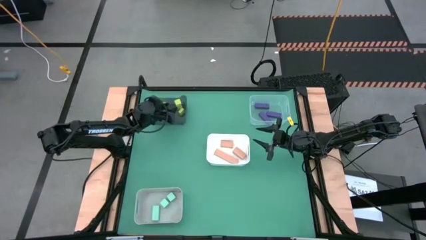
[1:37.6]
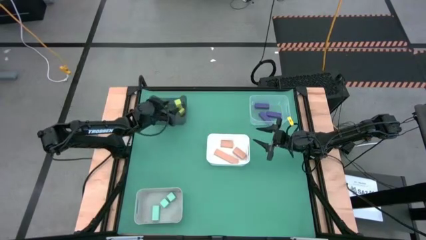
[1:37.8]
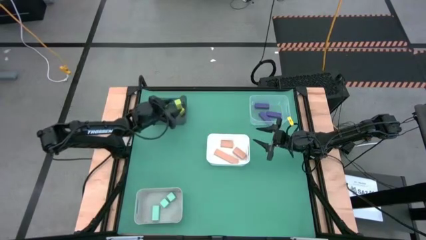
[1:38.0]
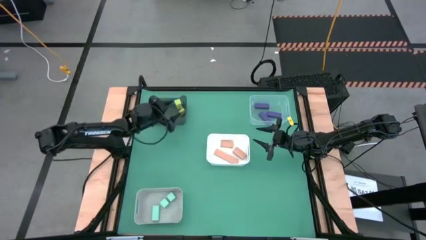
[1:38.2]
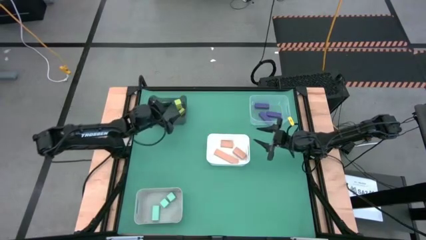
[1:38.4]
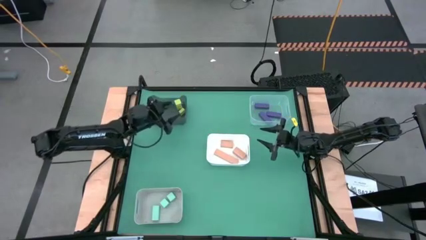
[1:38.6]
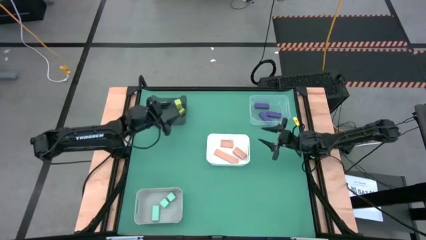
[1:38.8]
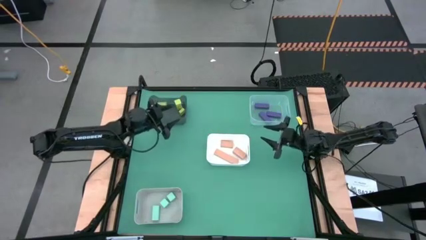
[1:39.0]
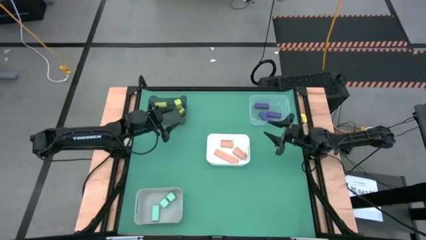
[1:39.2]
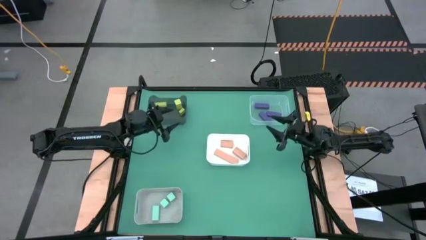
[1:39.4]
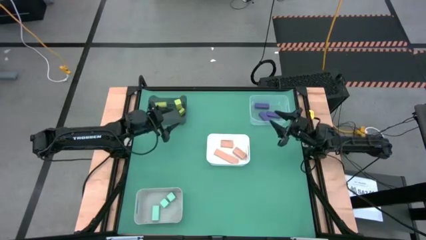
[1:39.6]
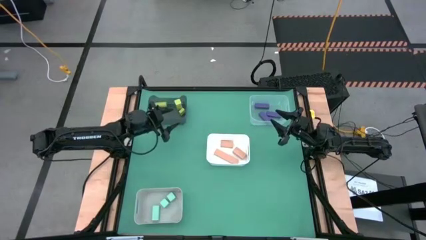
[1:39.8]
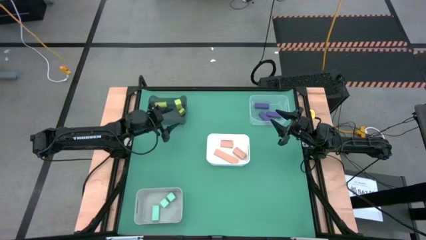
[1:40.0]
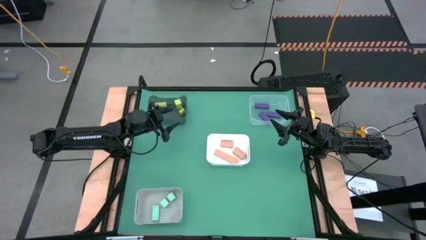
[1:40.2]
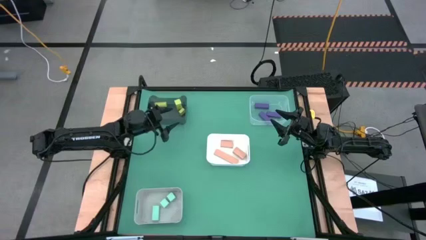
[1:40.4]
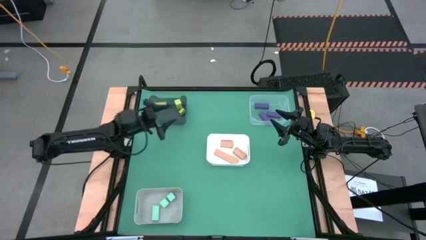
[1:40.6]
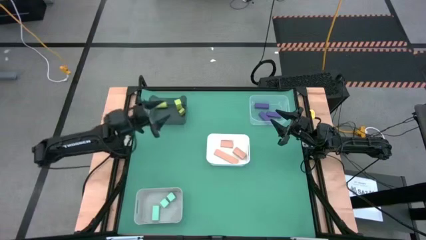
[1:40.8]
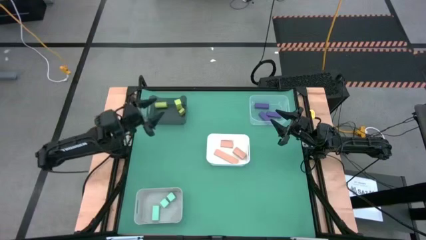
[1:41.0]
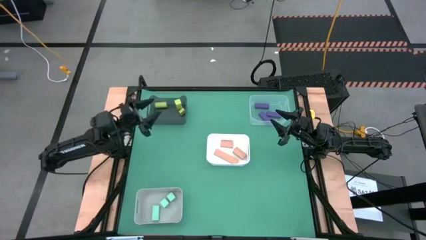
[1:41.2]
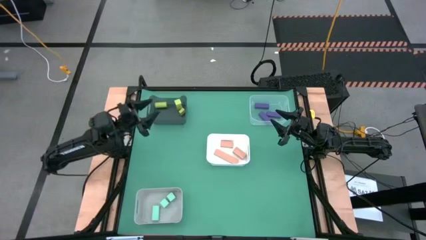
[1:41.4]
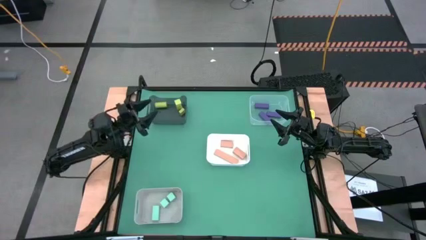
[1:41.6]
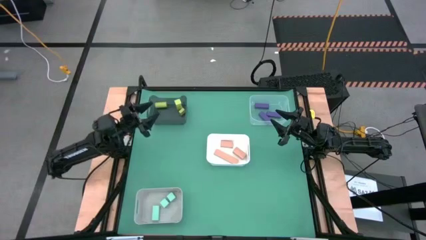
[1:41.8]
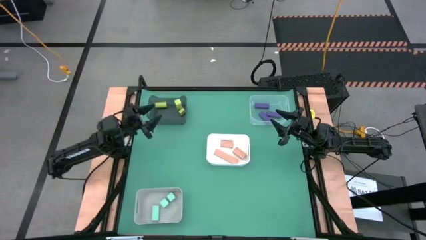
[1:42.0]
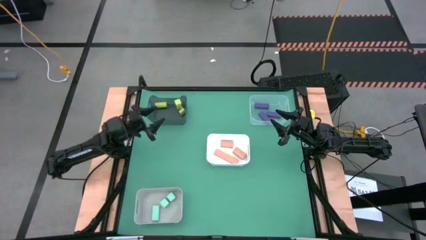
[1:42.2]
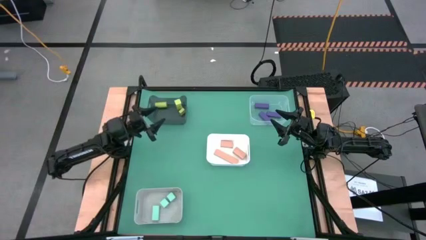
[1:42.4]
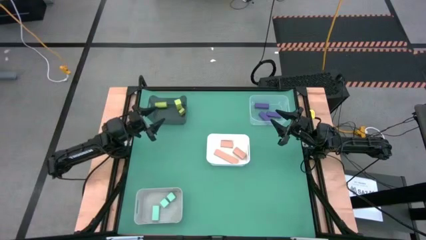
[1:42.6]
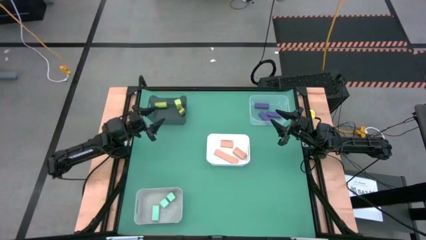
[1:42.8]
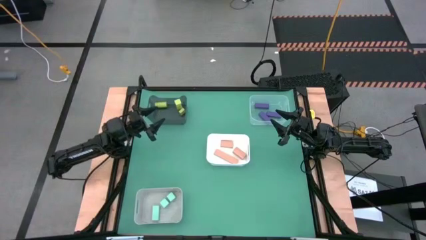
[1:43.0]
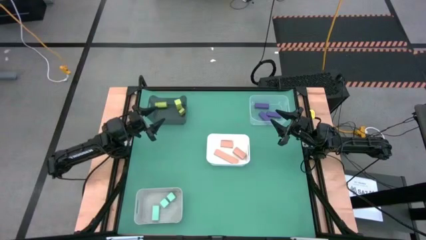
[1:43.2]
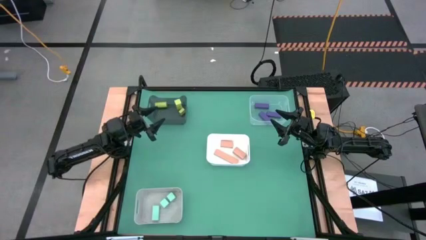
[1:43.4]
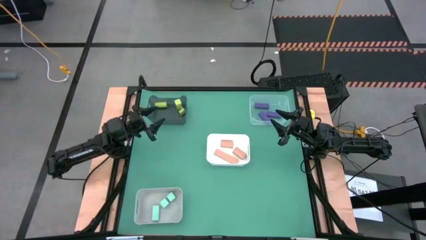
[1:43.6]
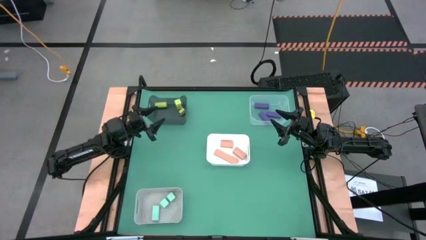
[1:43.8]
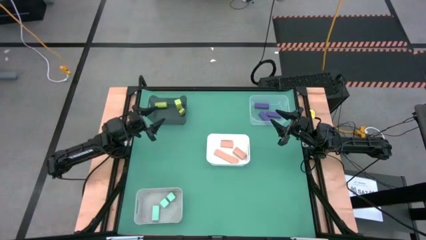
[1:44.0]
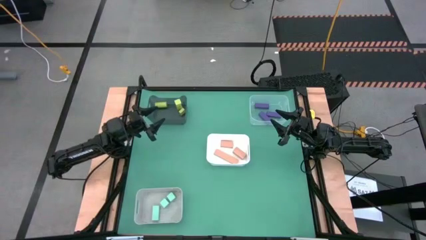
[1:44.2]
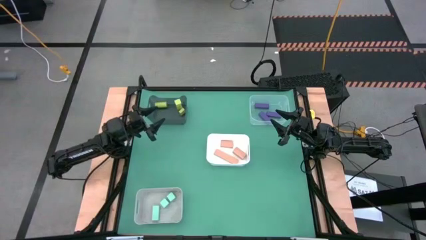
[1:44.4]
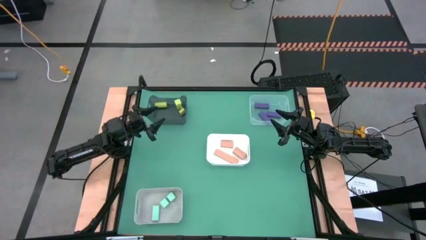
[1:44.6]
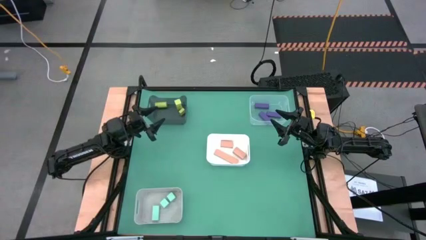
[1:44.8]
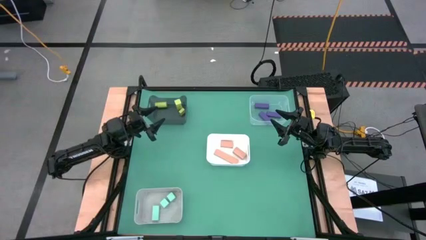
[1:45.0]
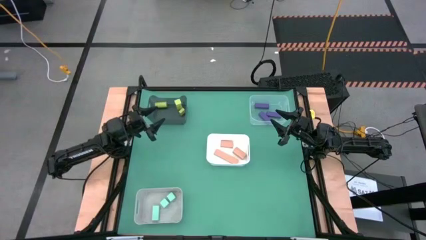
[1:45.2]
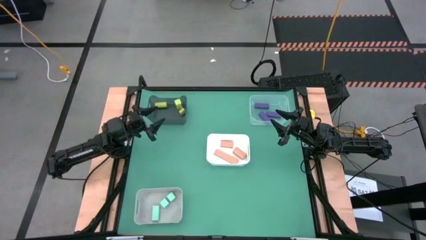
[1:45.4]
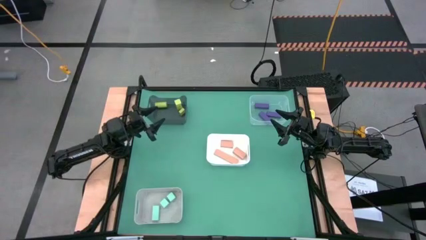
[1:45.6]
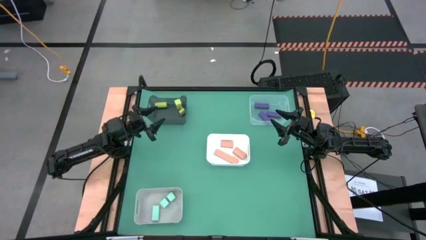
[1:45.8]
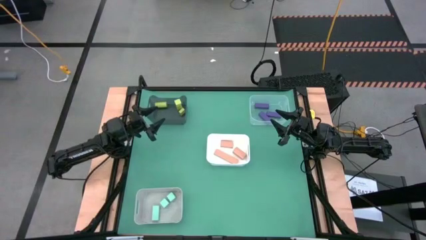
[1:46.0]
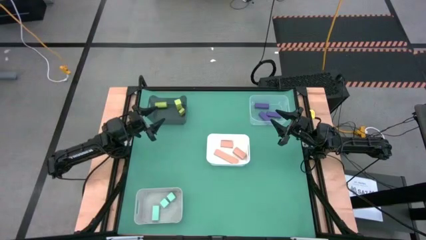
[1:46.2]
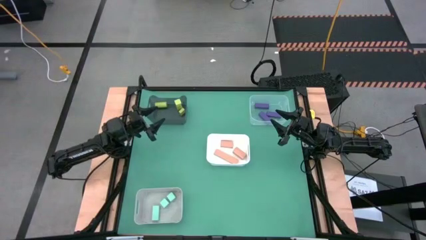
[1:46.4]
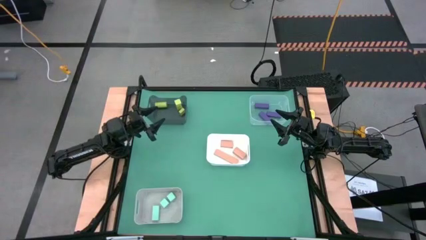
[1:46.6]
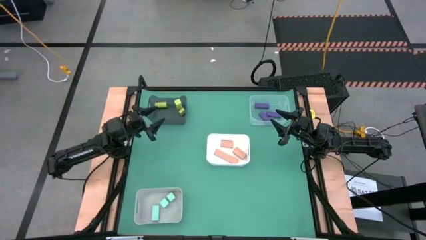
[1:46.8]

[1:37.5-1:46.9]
Task: Sort & place blocks by color
Return to Home Position

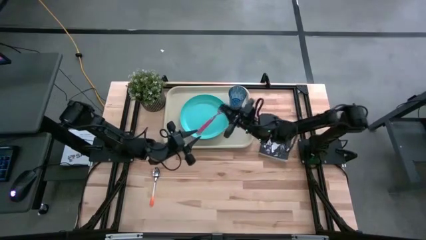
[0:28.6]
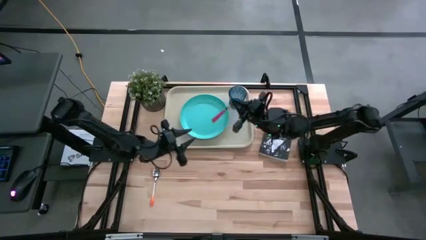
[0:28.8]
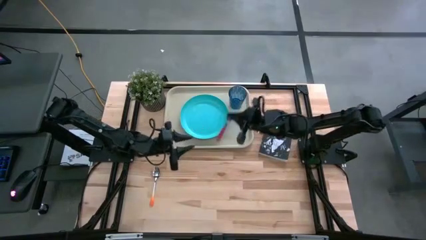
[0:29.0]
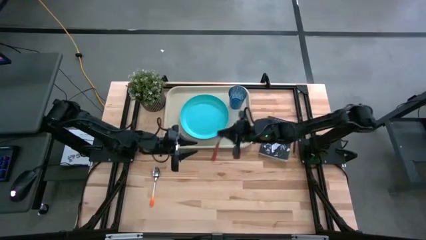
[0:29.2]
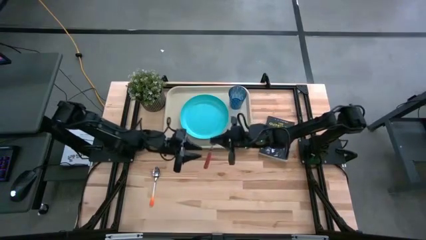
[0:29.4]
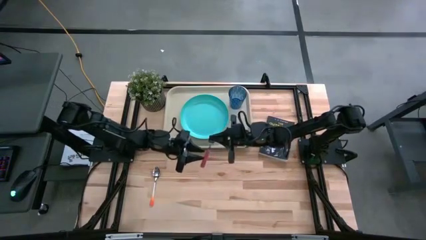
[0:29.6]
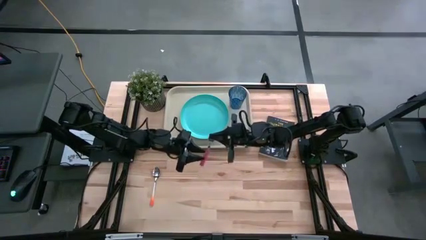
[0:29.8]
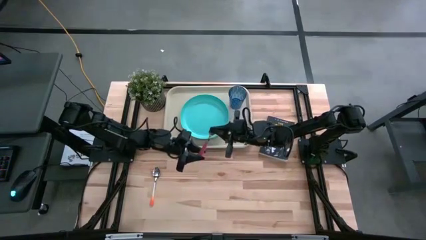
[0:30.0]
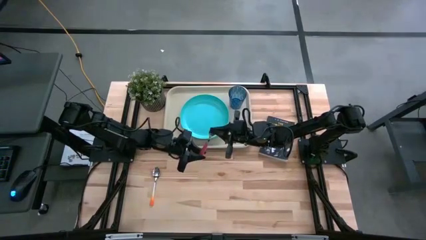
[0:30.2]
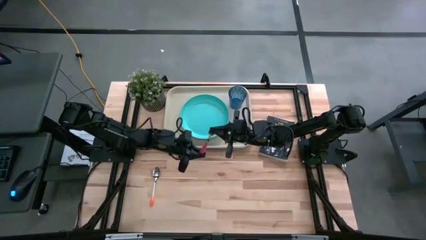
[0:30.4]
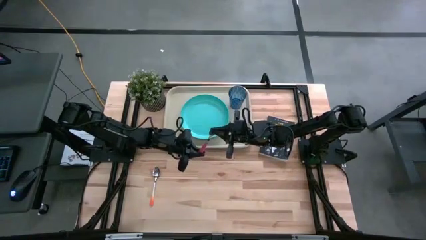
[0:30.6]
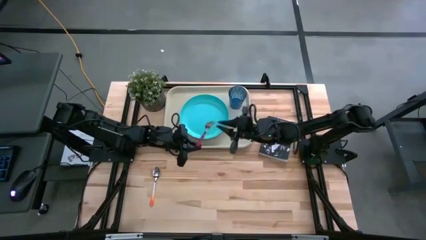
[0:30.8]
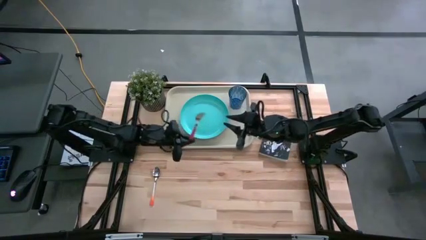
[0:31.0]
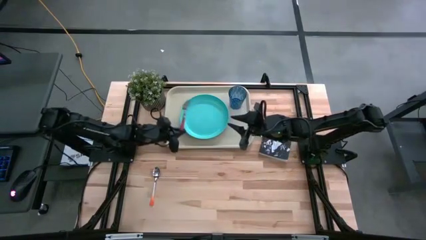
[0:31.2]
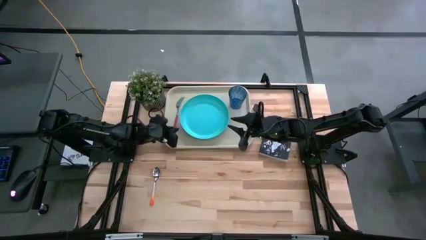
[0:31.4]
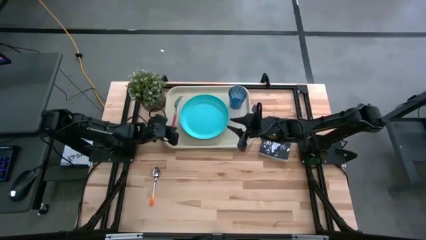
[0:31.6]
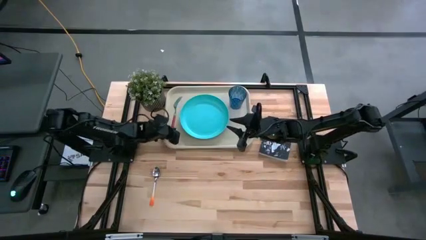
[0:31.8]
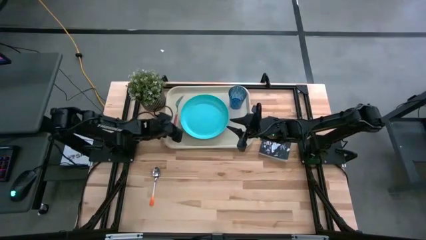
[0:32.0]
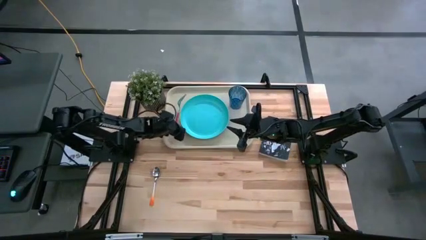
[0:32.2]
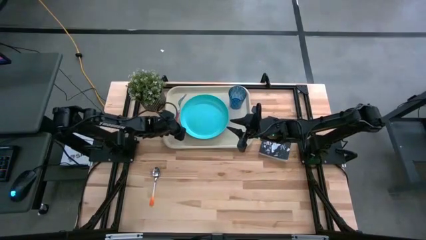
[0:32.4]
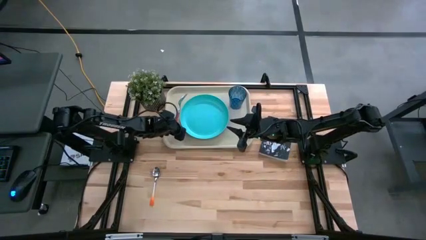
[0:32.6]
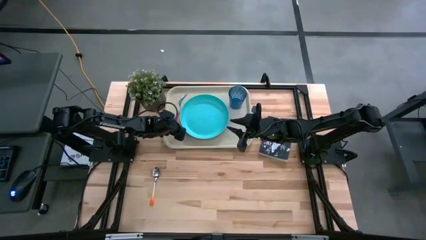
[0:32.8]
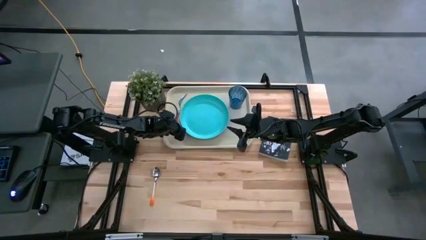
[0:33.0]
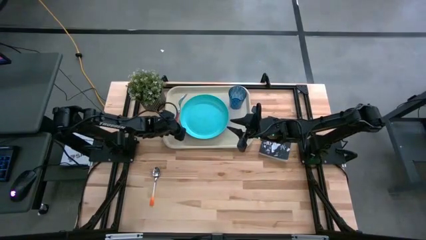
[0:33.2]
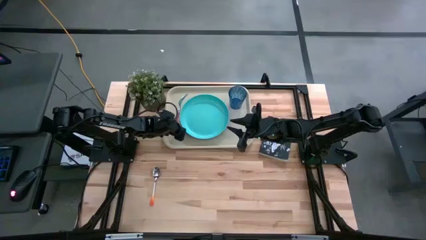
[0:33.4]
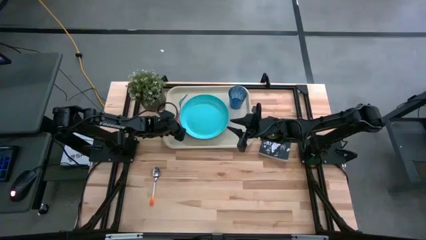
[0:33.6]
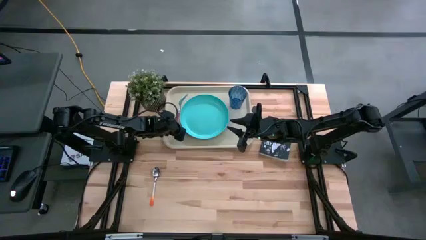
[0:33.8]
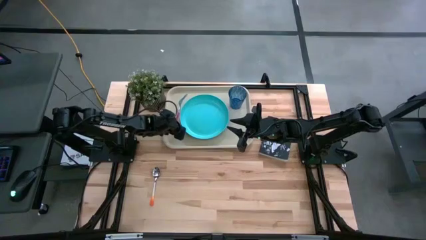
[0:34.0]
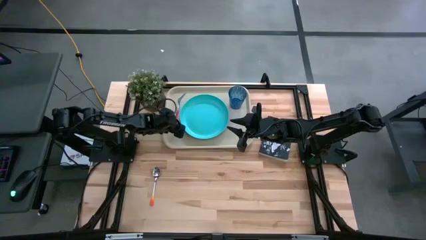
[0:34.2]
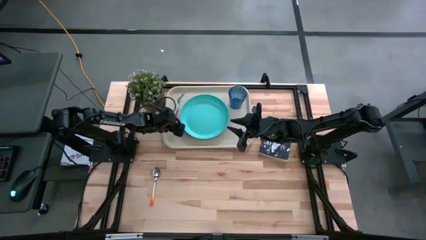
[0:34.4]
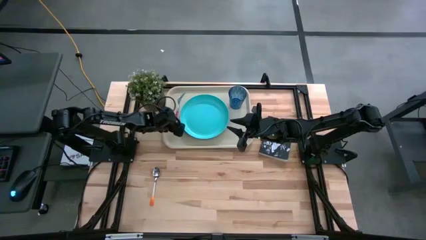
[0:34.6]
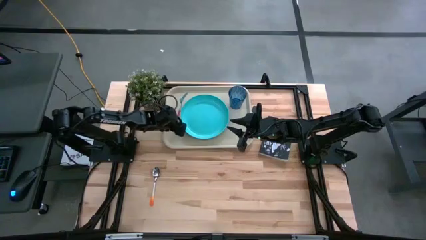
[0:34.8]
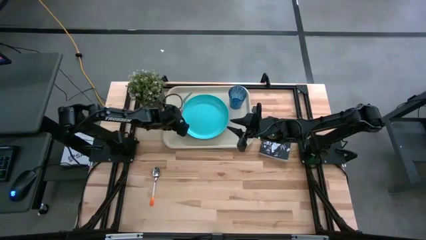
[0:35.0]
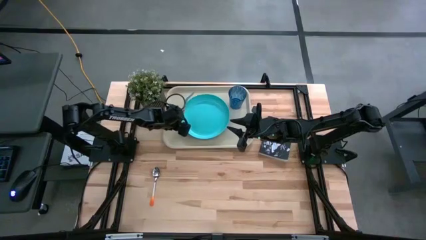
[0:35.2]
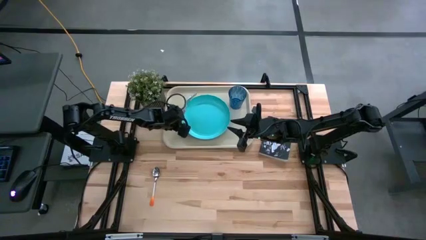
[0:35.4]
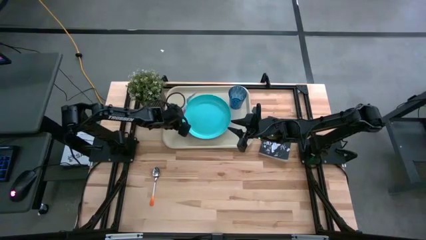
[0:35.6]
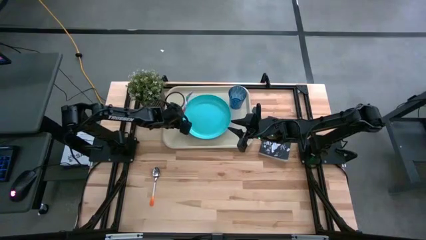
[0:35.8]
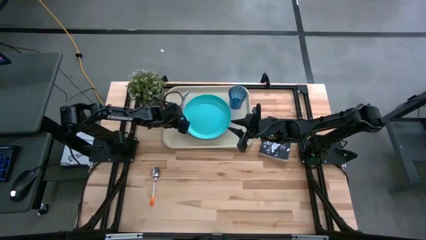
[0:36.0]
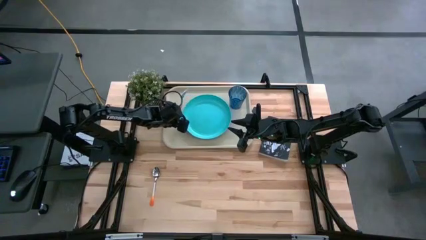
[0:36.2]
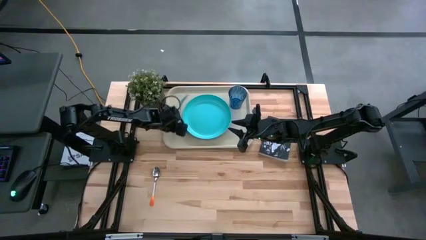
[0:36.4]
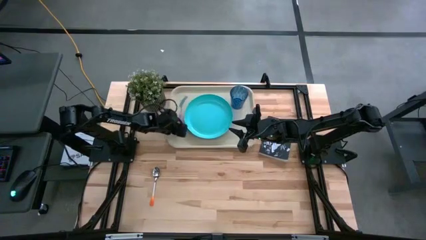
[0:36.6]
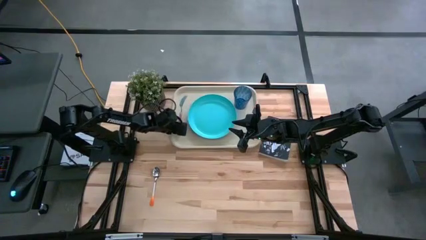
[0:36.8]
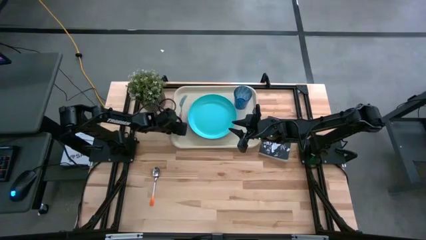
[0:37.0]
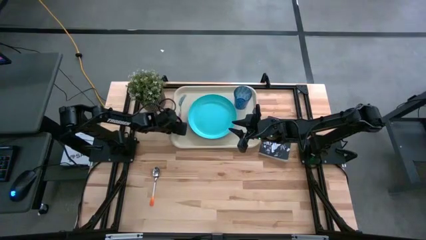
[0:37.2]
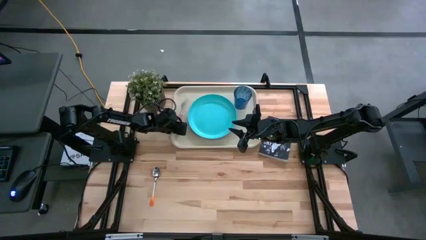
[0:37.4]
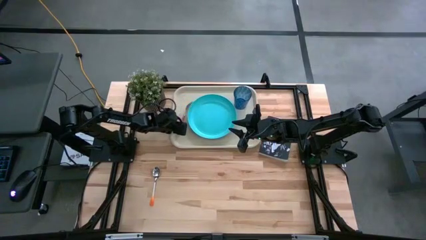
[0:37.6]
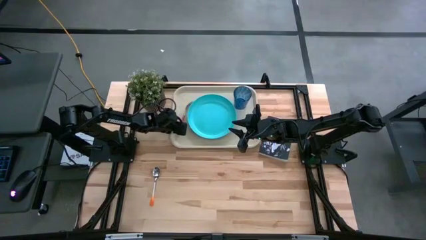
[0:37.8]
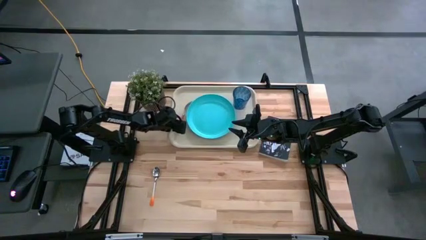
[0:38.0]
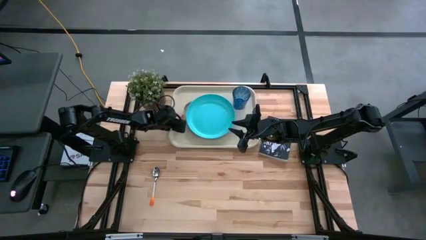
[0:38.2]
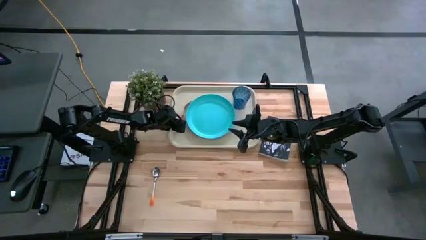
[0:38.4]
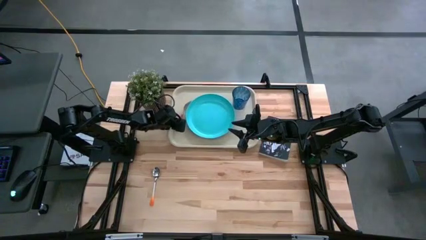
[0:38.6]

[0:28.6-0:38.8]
Task: Pick and place plate/cup/fork/spoon on tray
Put the red fork on the white serving tray to the left of the blue plate
